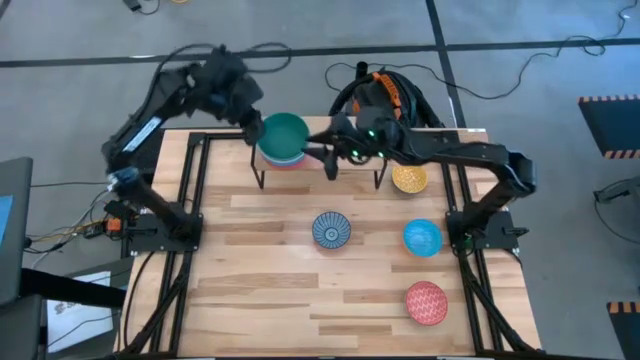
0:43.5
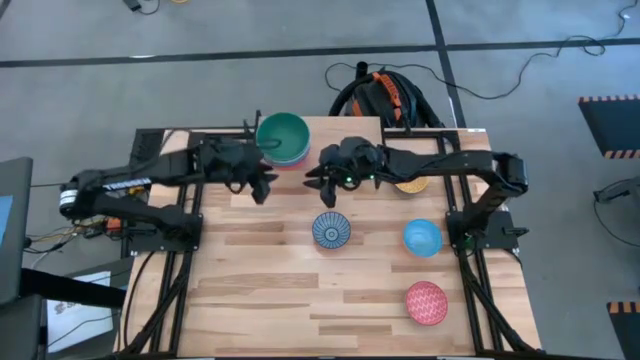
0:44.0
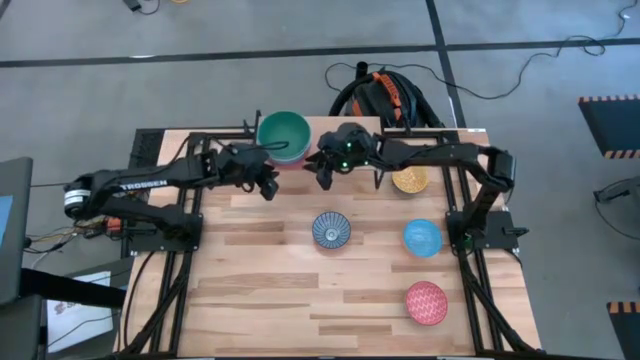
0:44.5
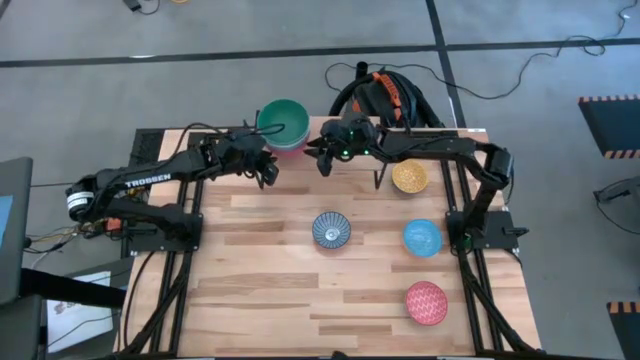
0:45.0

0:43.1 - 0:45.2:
Task: Place and stack bowls onto a shelf
Adjust the stacked bowls on the shelf

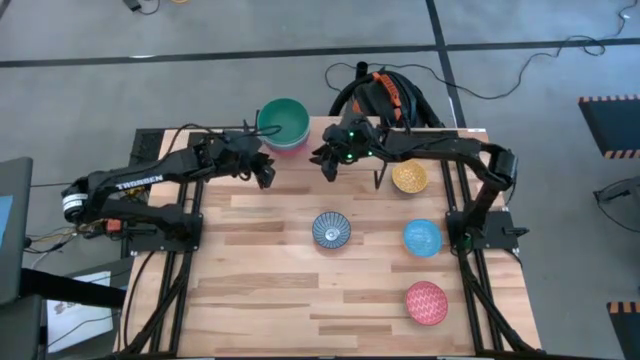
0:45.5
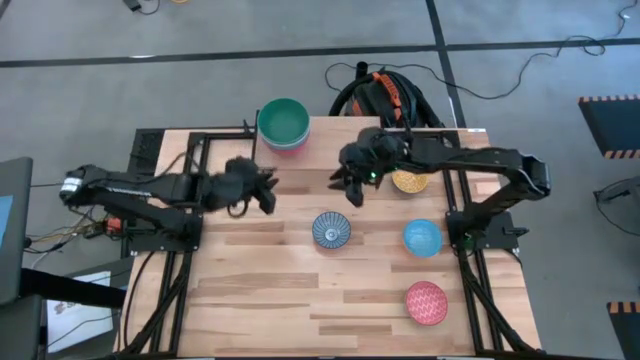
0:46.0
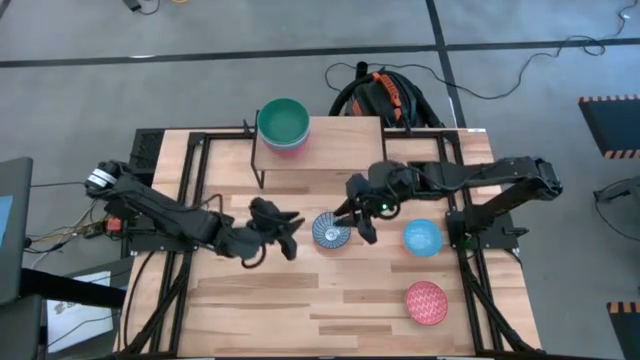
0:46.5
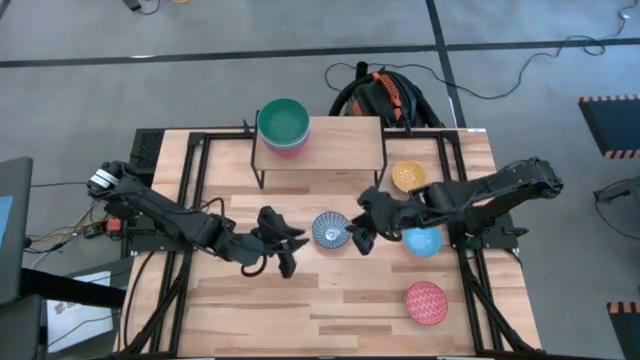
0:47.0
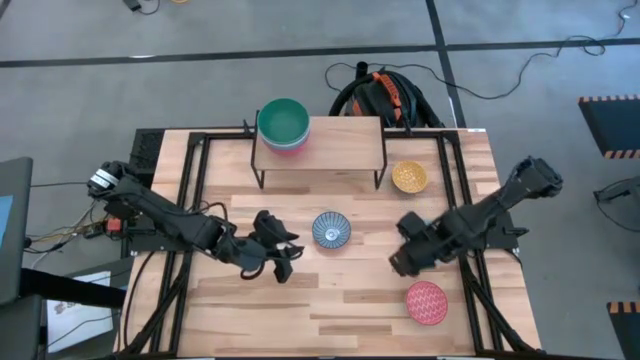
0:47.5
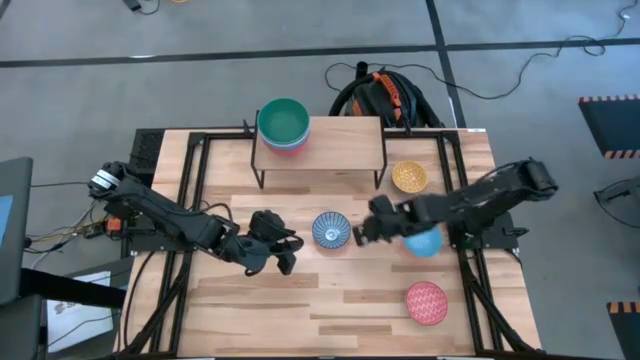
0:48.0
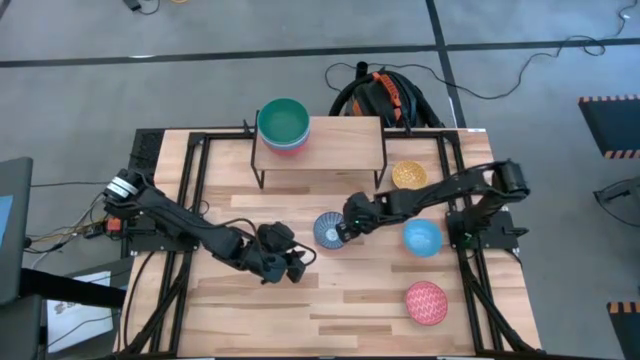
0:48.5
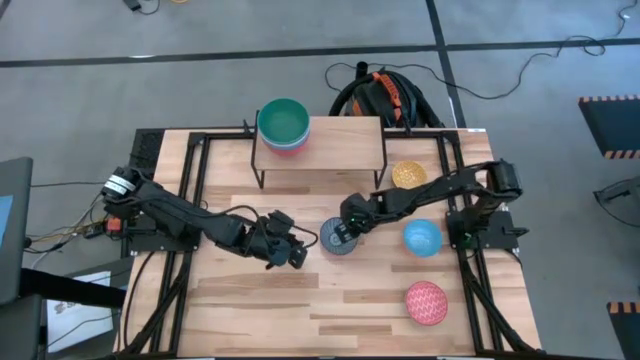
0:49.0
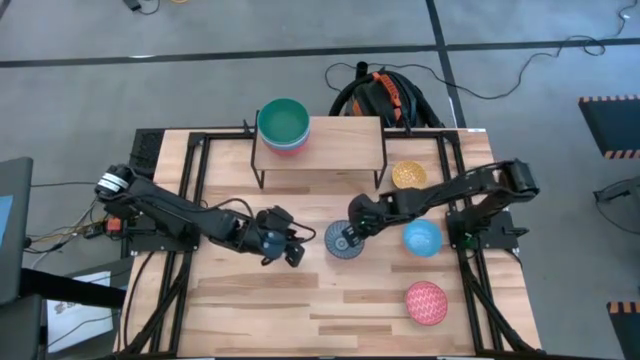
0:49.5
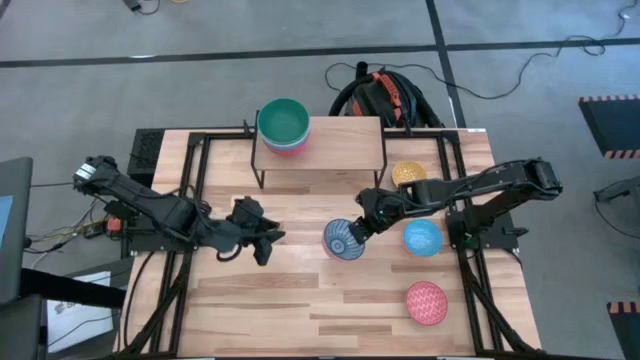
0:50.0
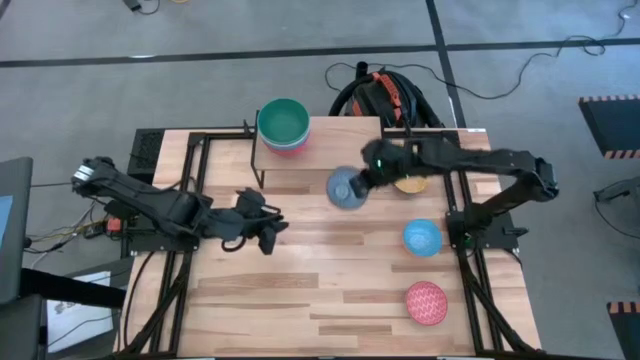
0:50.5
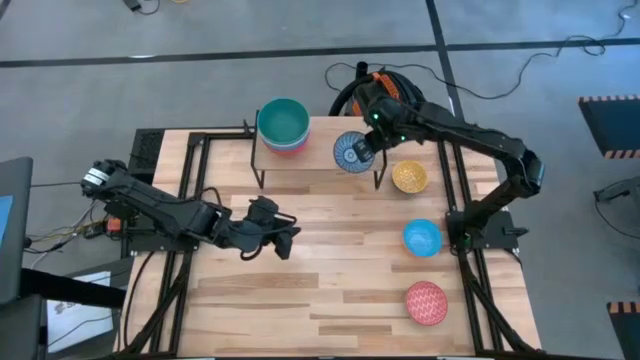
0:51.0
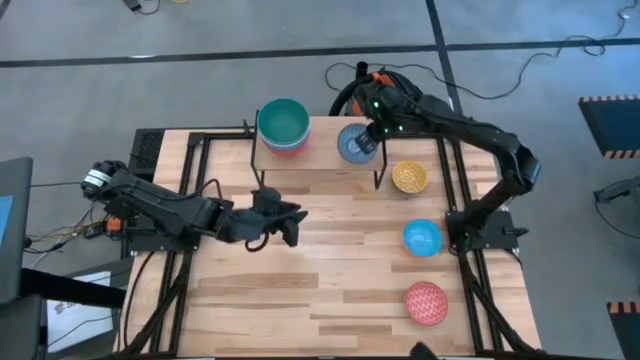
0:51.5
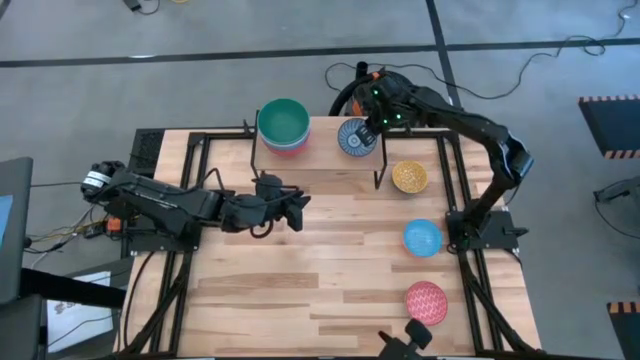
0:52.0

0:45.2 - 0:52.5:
Put the blue patterned bowl on the shelf

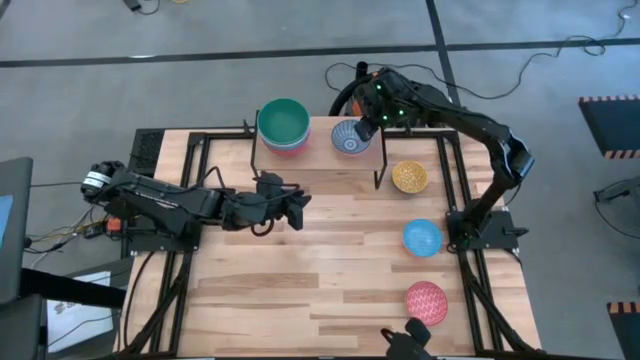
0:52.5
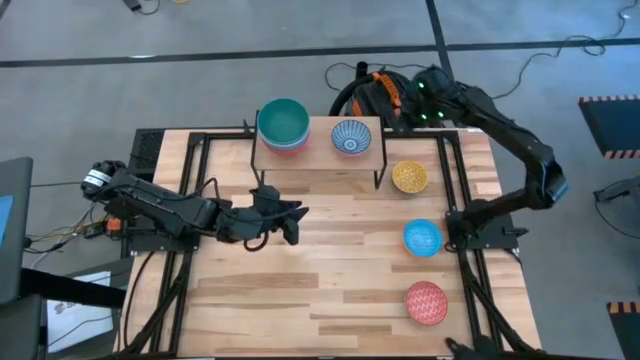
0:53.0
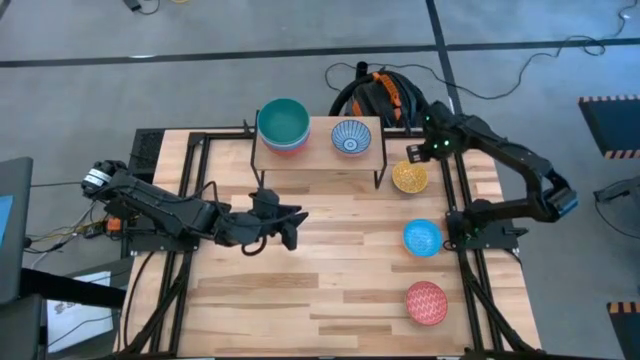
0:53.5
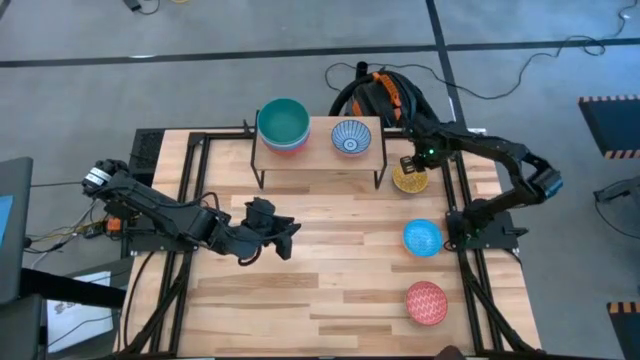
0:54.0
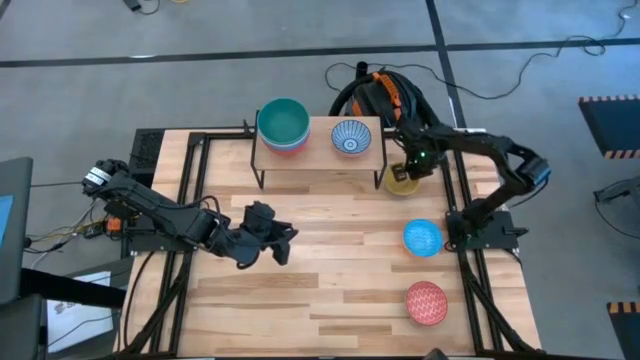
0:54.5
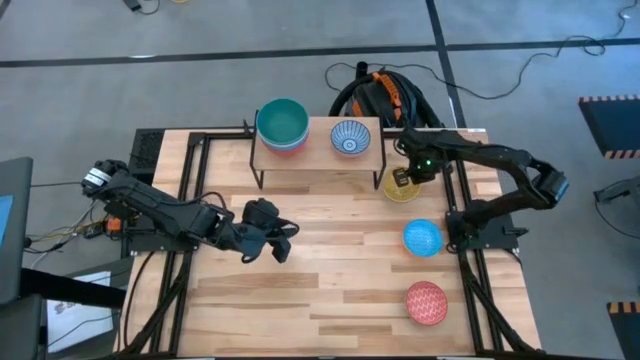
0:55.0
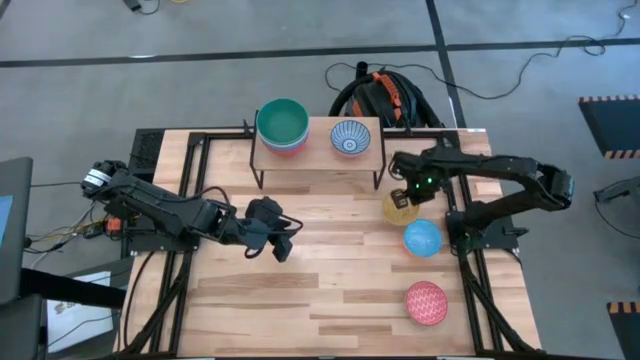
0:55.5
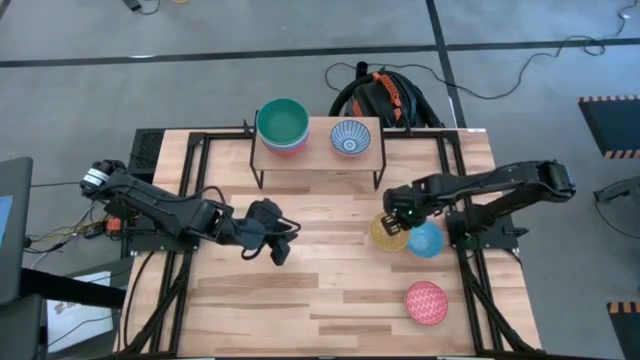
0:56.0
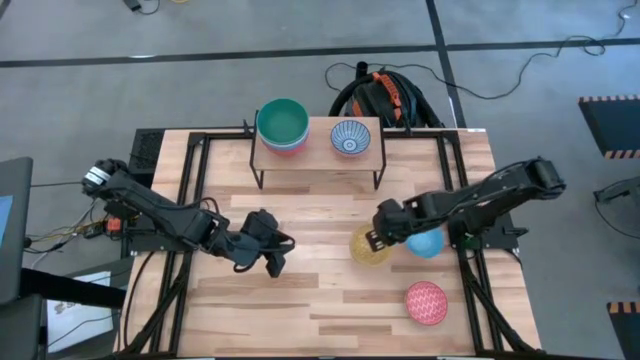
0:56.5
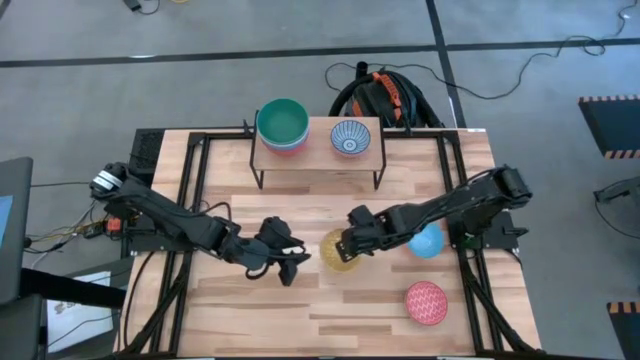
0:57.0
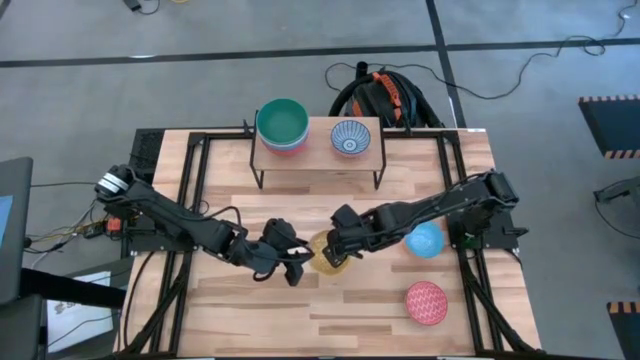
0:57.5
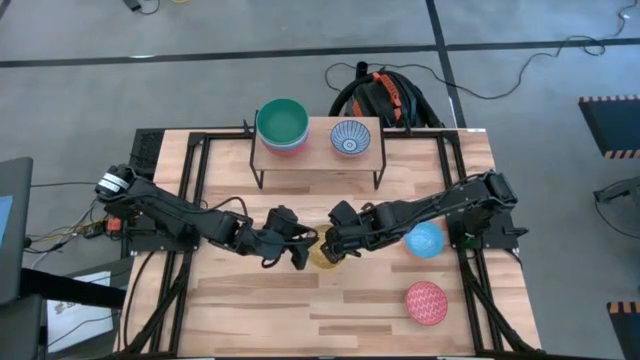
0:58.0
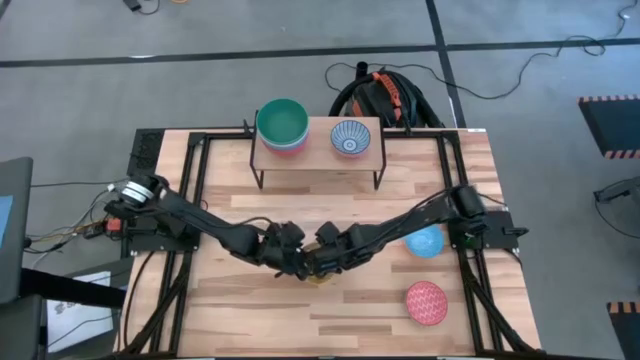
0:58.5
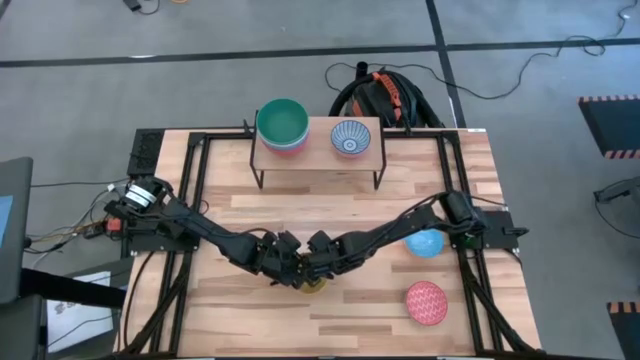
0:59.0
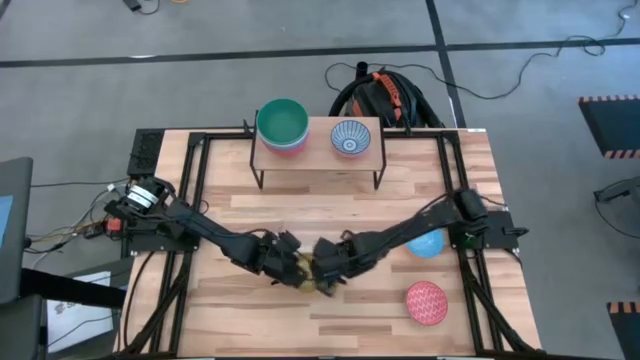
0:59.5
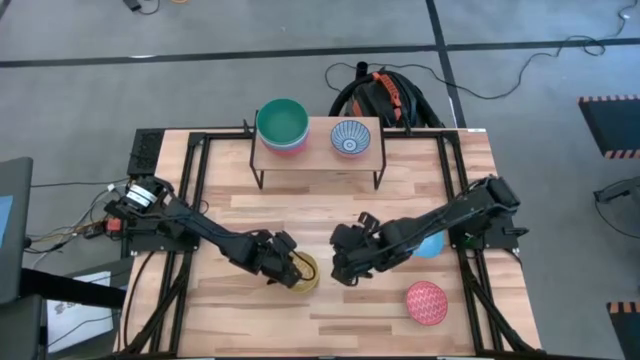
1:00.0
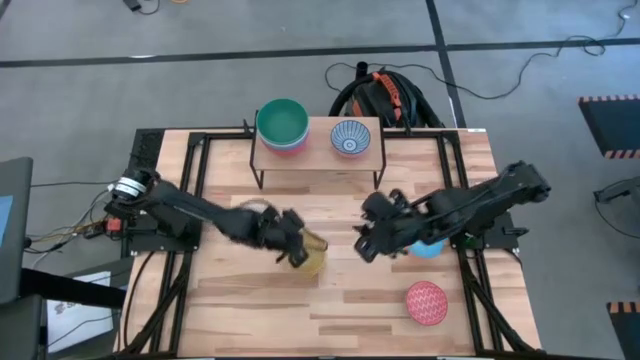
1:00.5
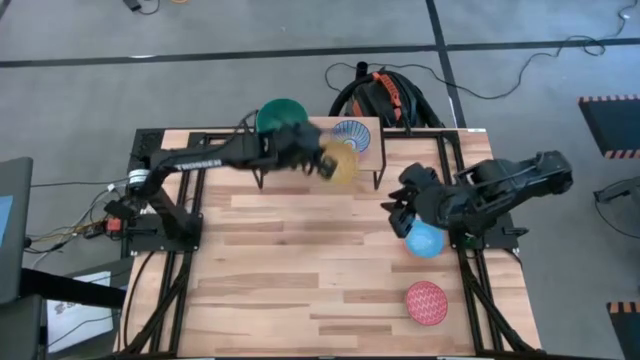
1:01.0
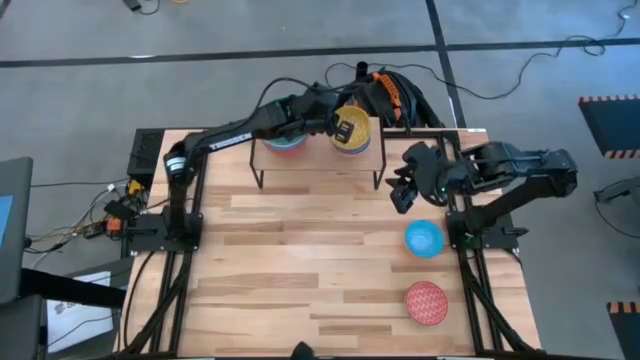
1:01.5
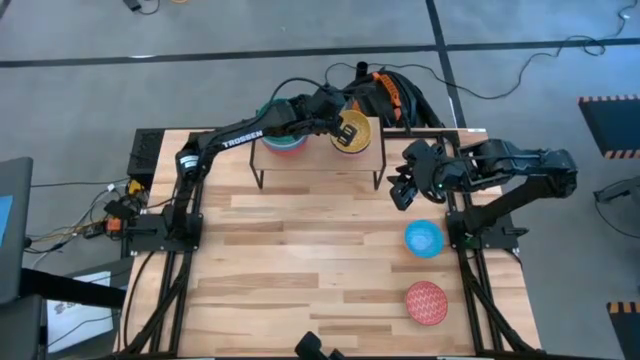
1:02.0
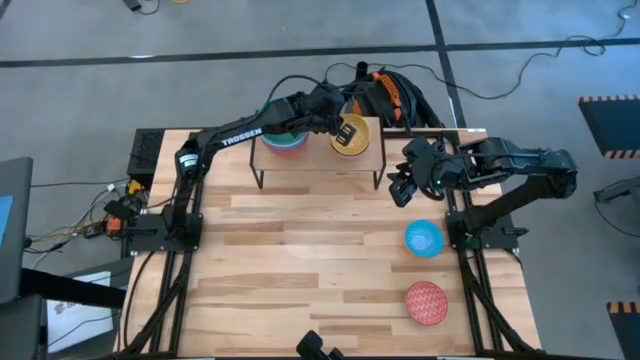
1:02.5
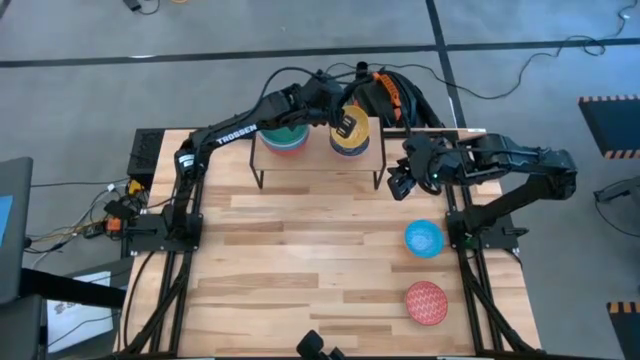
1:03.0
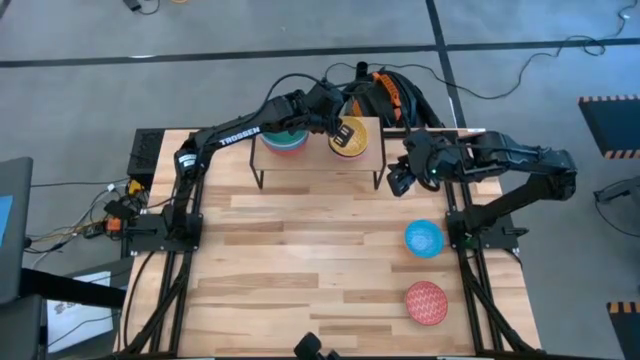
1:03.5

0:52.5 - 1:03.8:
Stack the yellow patterned bowl on top of the blue patterned bowl on the shelf

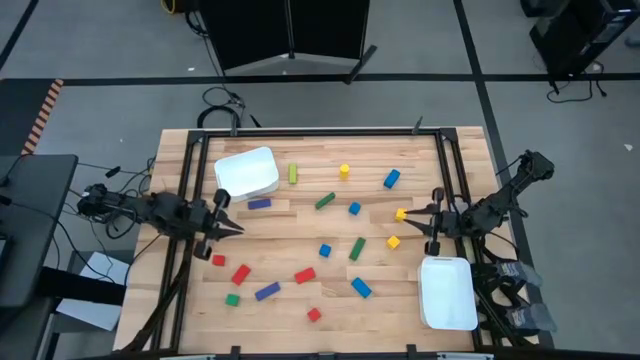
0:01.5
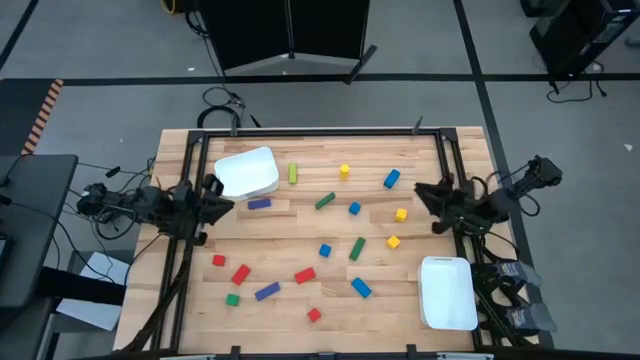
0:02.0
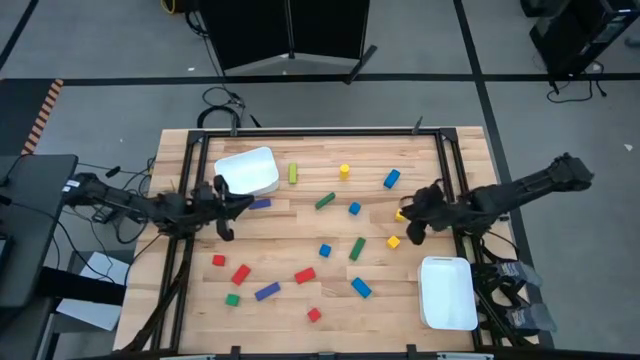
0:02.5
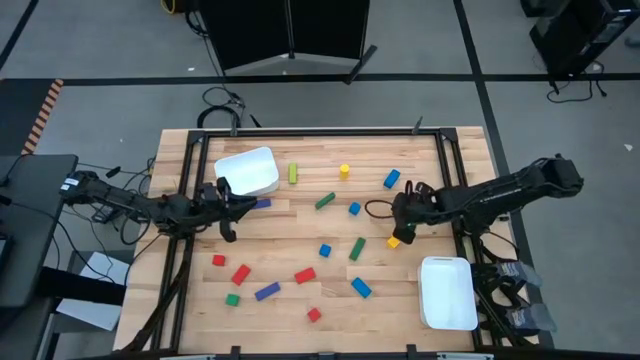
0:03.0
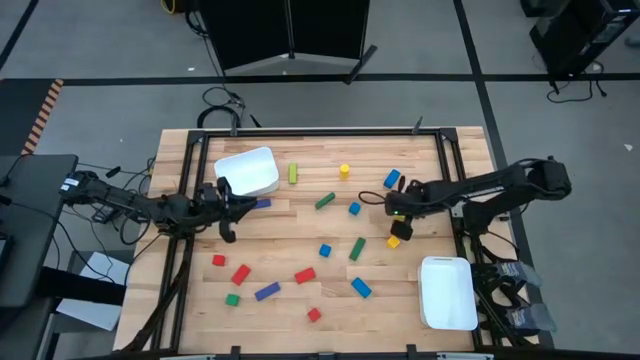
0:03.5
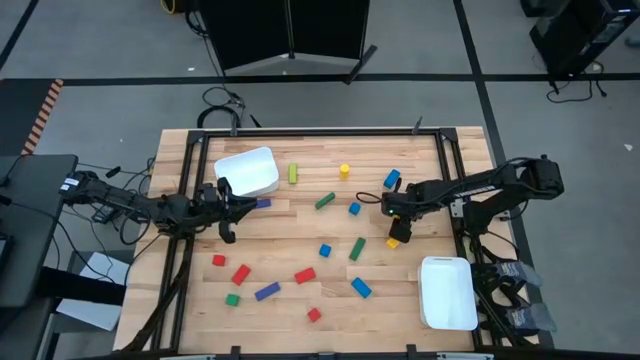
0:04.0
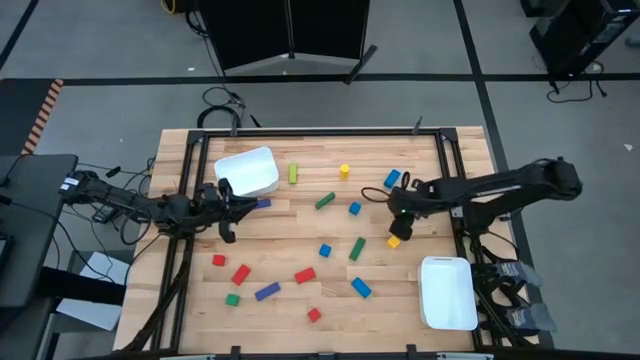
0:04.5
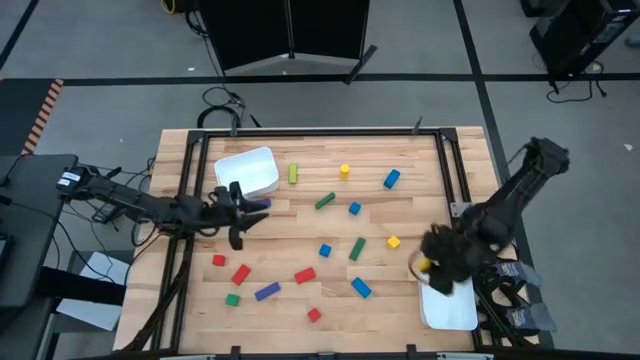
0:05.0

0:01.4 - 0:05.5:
Task: Sort blocks by size
Put the small yellow block into the bottom white bin
